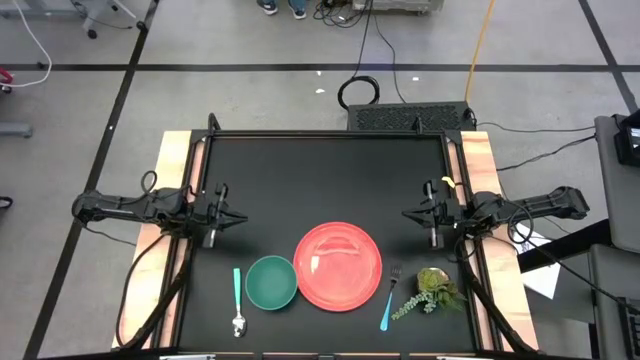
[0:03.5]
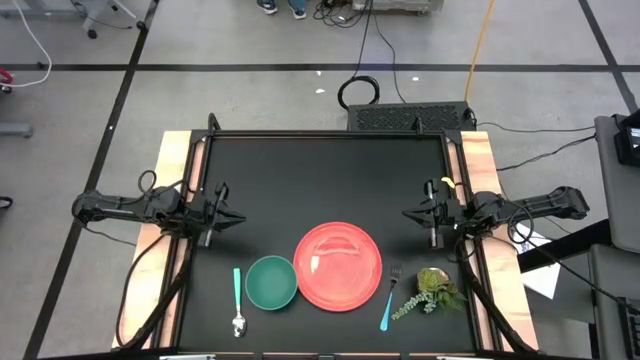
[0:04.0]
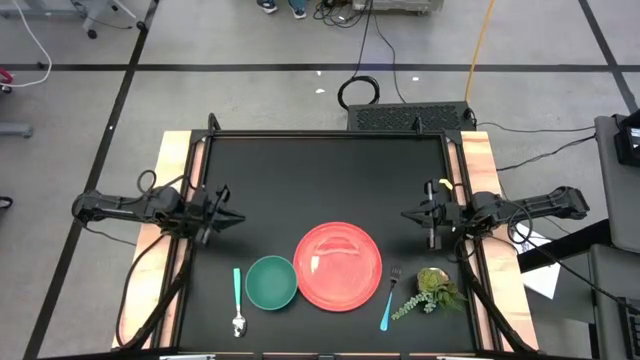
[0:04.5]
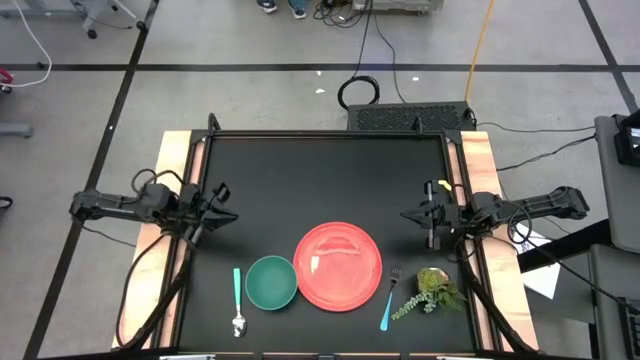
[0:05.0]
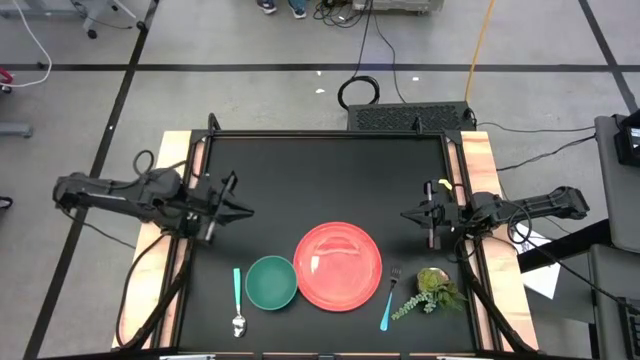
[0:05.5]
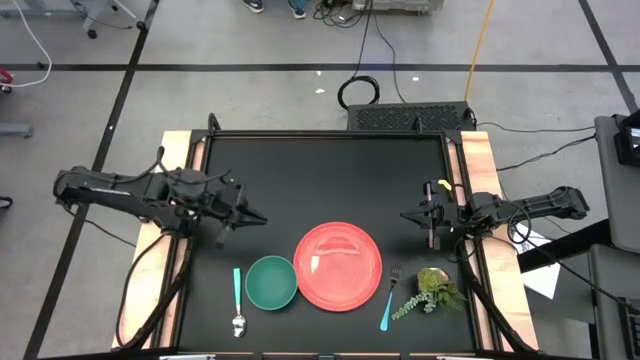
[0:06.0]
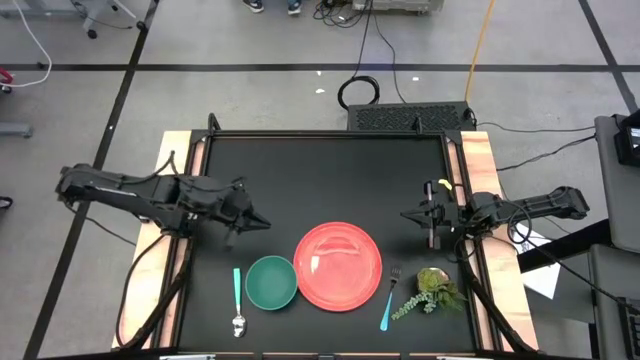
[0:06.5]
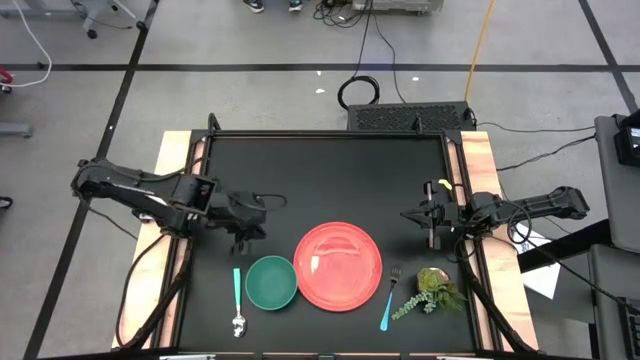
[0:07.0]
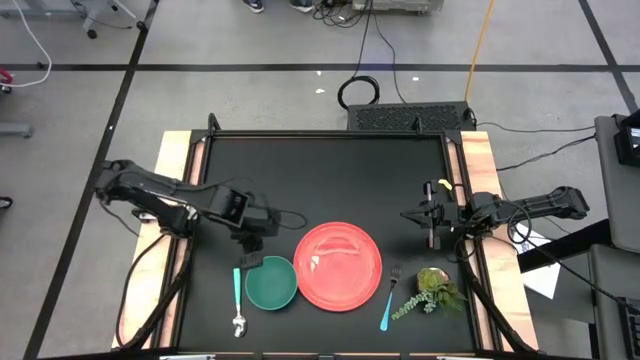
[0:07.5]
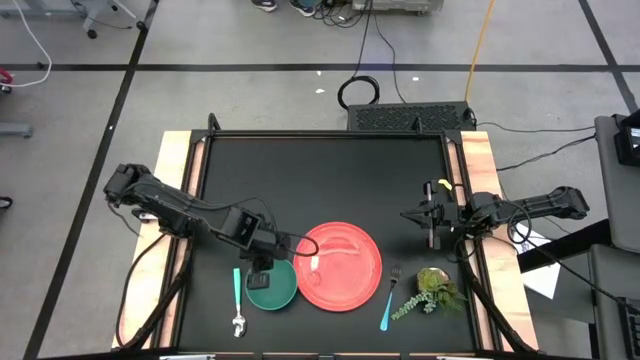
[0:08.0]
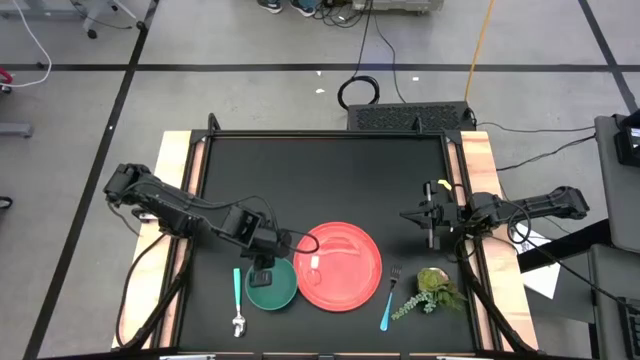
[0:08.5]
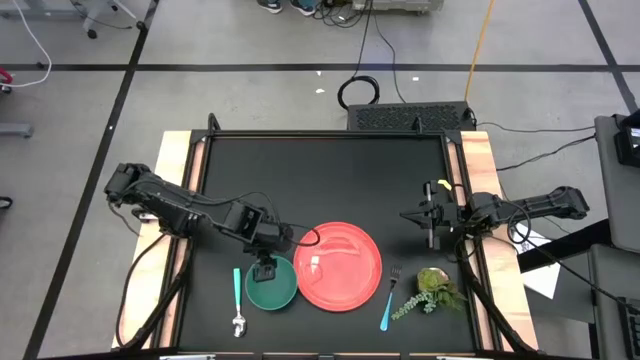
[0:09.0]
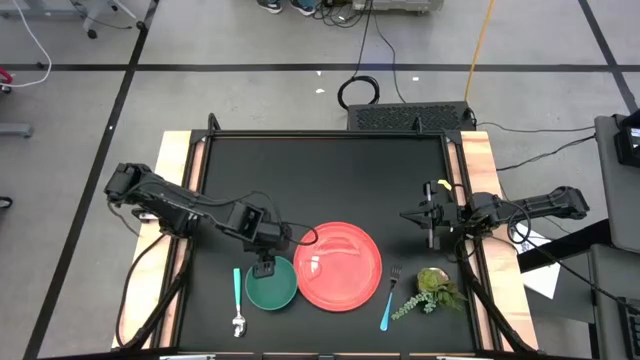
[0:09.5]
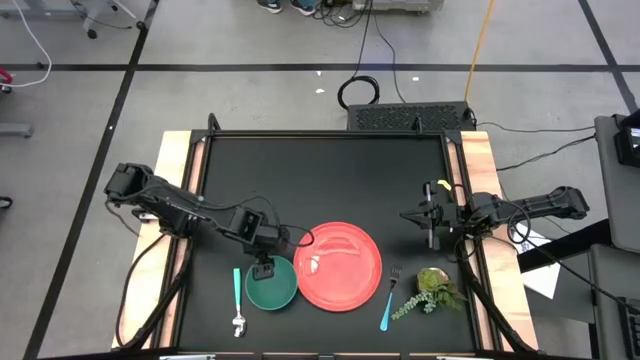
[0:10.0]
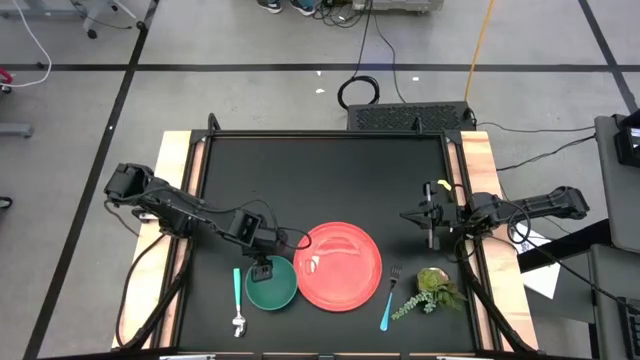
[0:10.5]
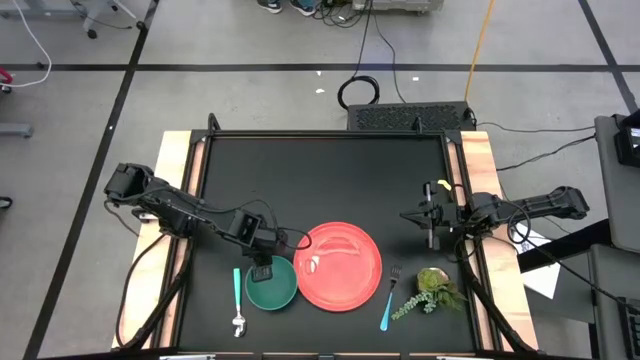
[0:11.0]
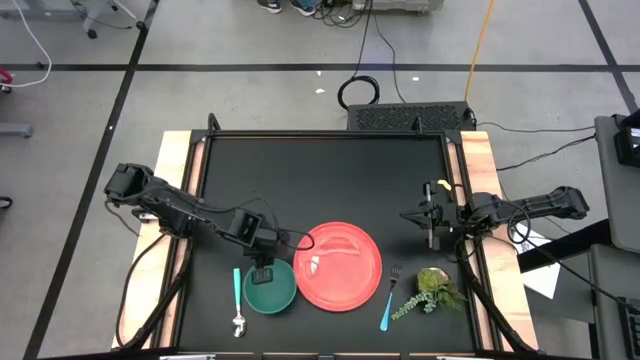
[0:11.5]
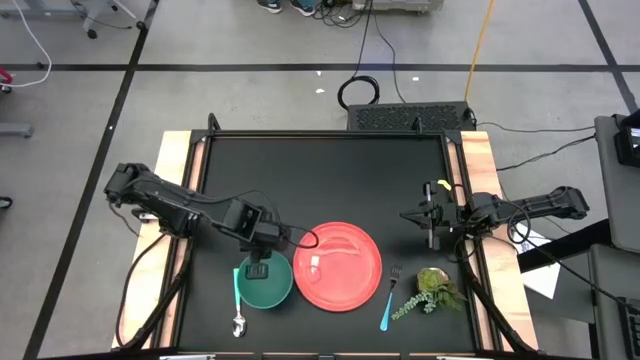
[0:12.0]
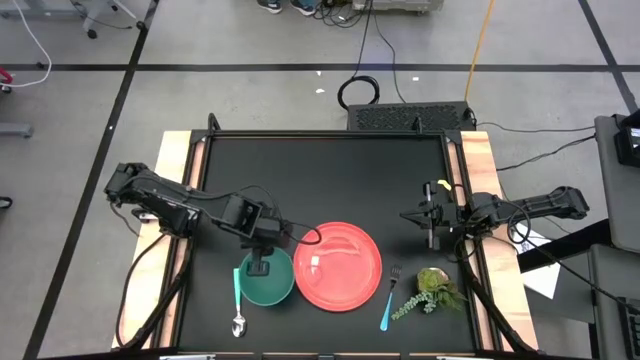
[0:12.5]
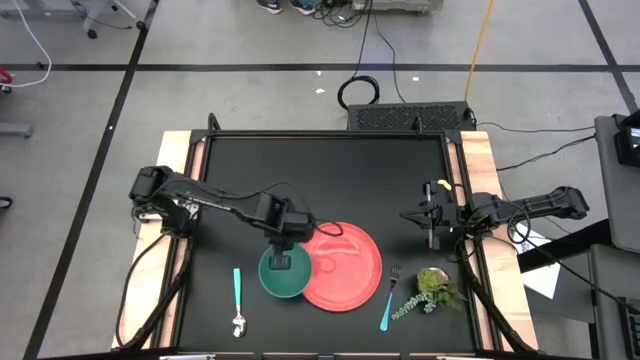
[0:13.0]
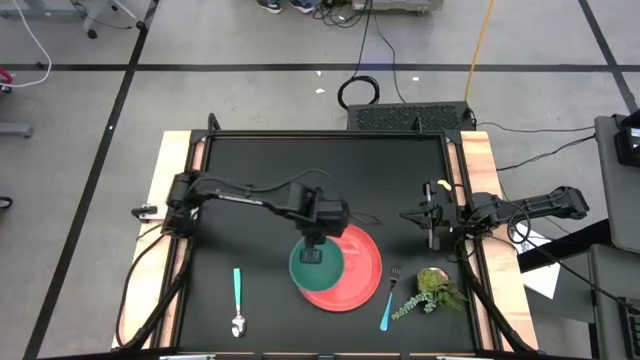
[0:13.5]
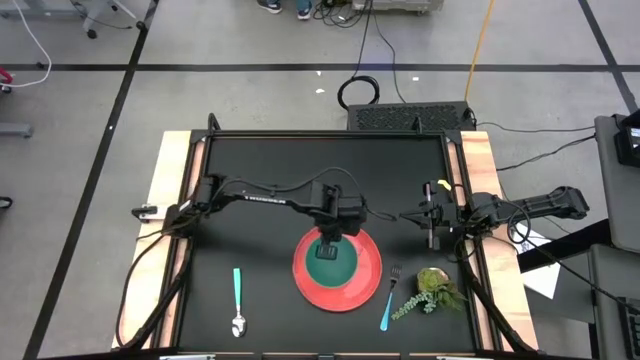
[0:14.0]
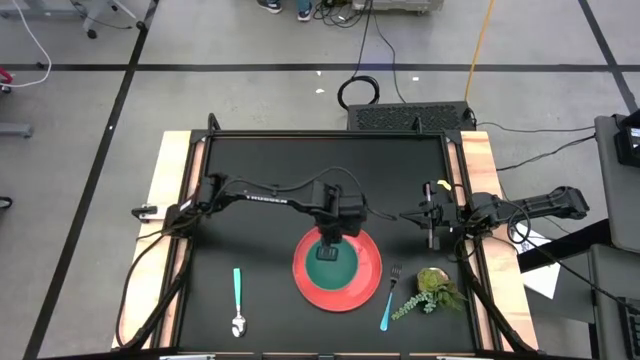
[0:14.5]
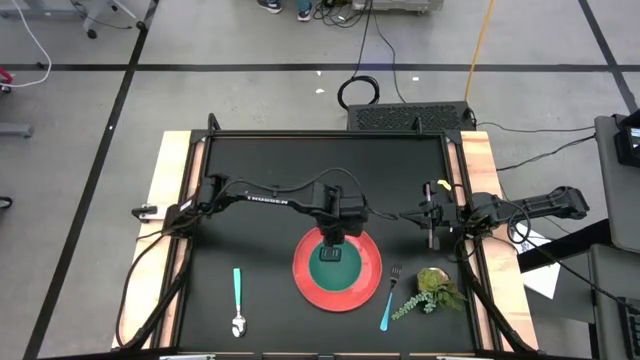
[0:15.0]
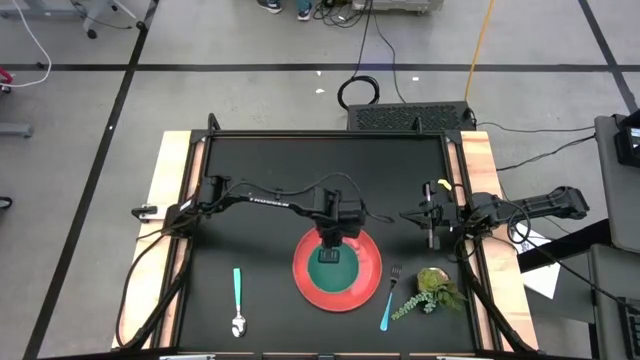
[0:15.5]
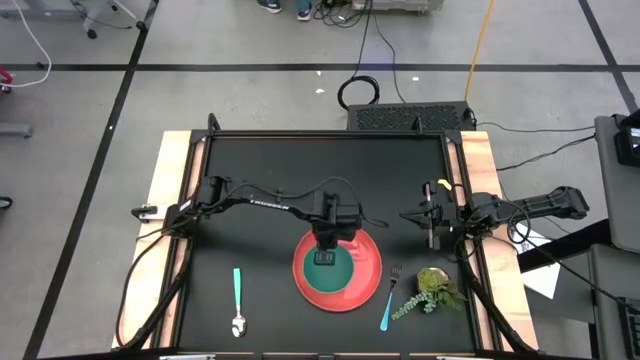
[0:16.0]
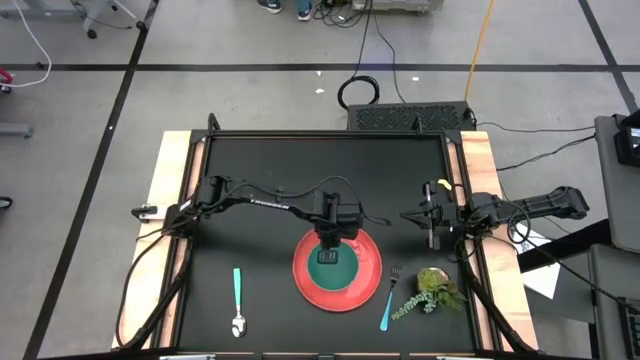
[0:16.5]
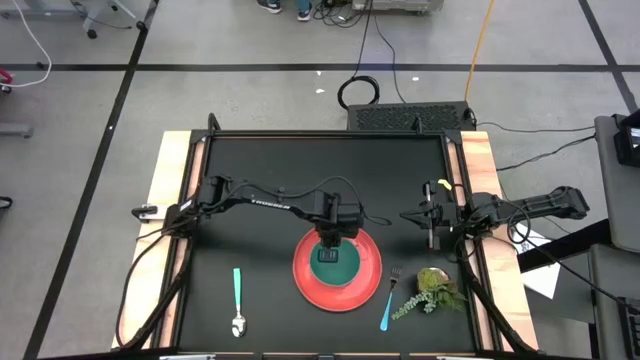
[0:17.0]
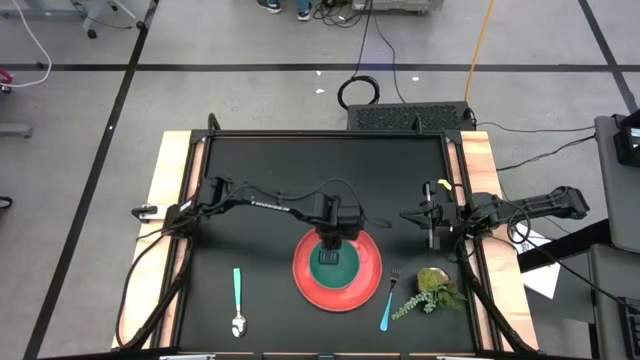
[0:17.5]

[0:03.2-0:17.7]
Task: Set table place
Put the green bowl on the orange plate

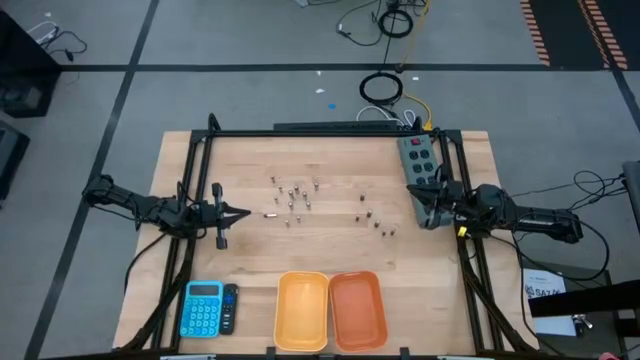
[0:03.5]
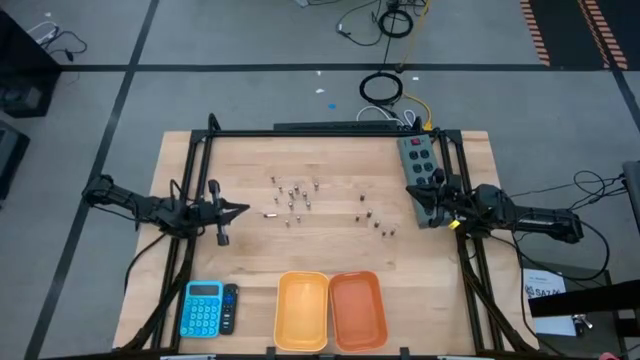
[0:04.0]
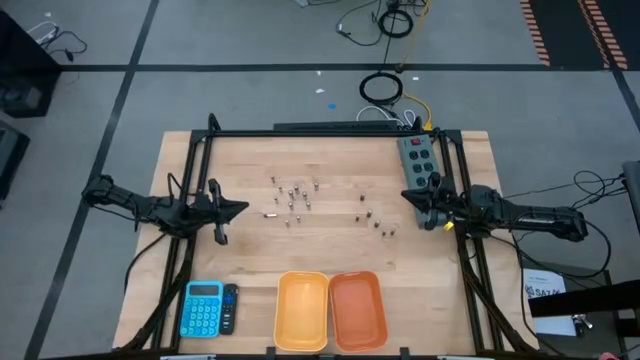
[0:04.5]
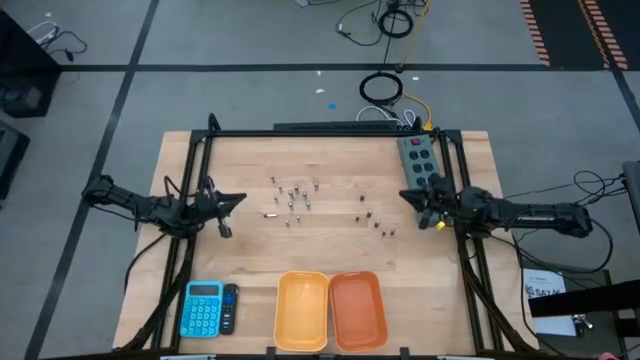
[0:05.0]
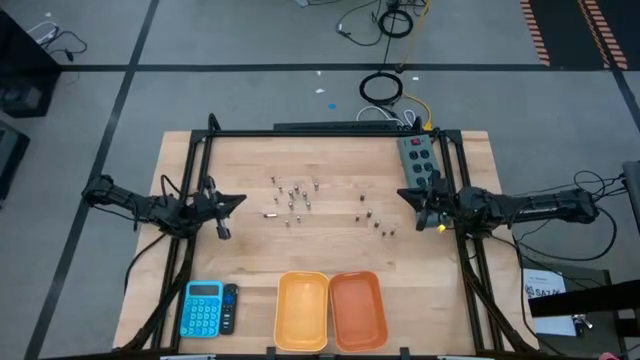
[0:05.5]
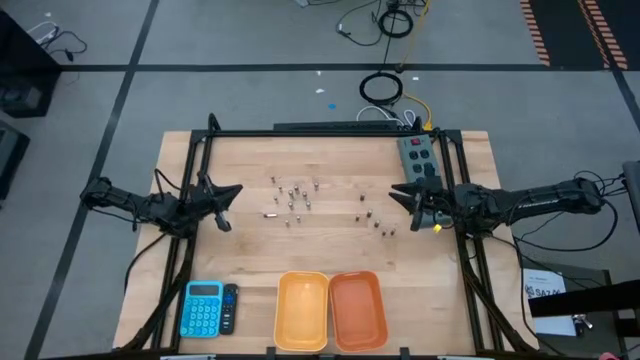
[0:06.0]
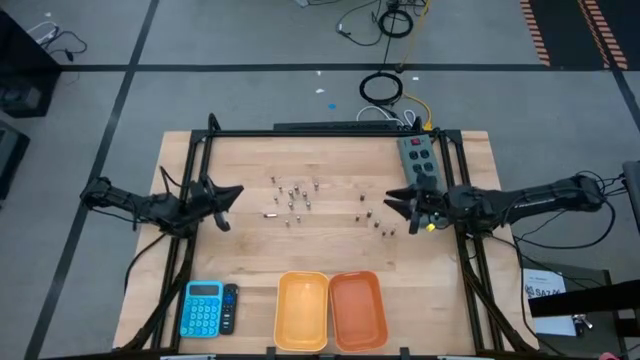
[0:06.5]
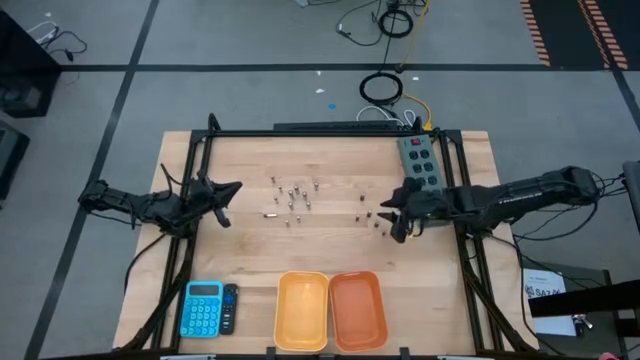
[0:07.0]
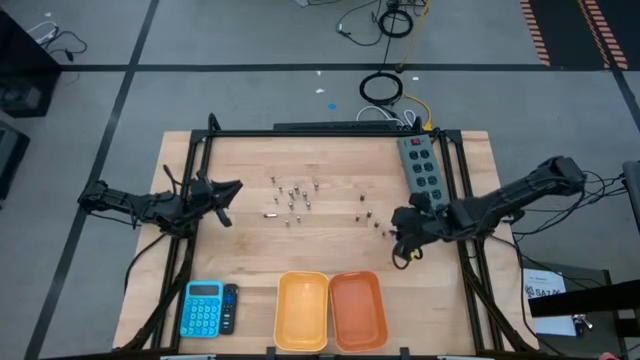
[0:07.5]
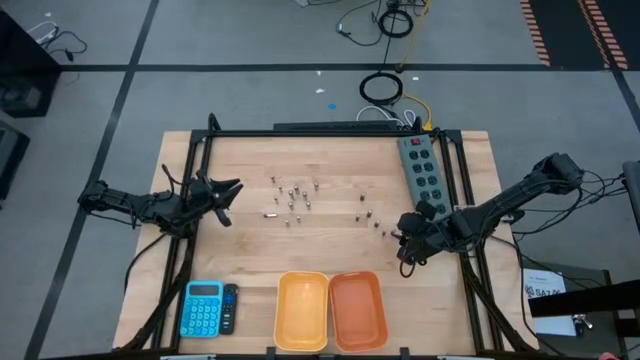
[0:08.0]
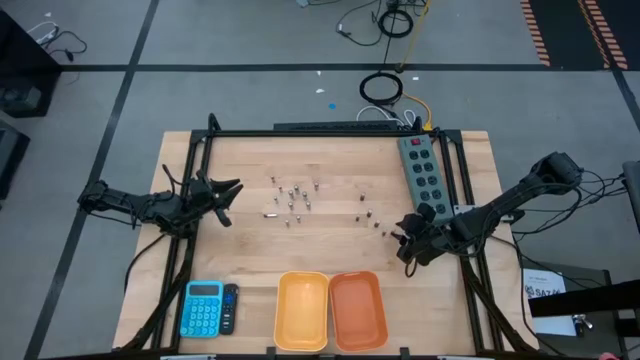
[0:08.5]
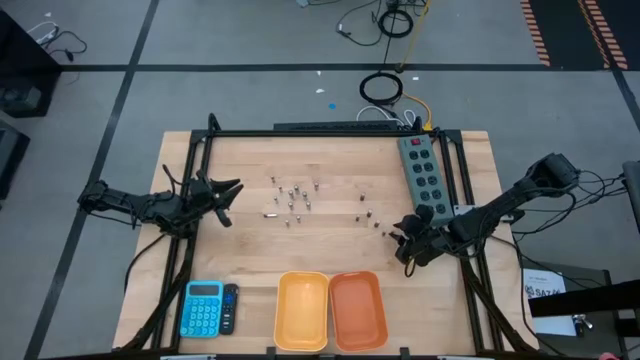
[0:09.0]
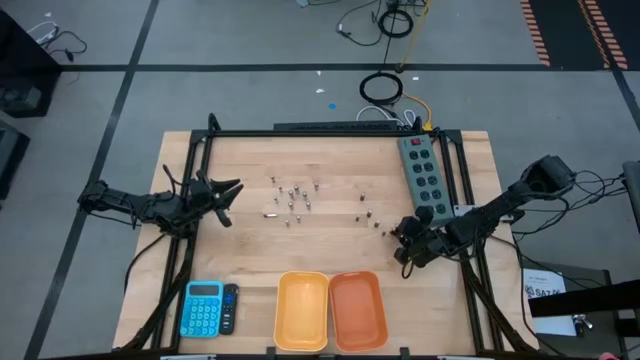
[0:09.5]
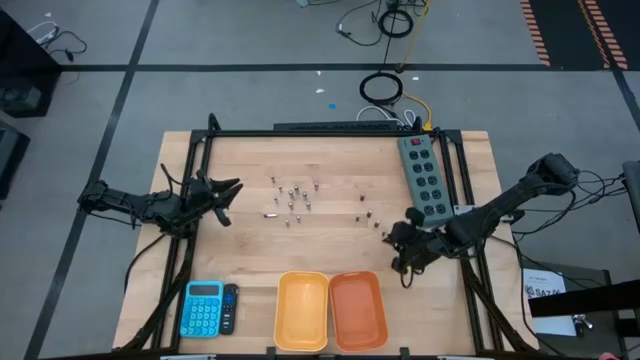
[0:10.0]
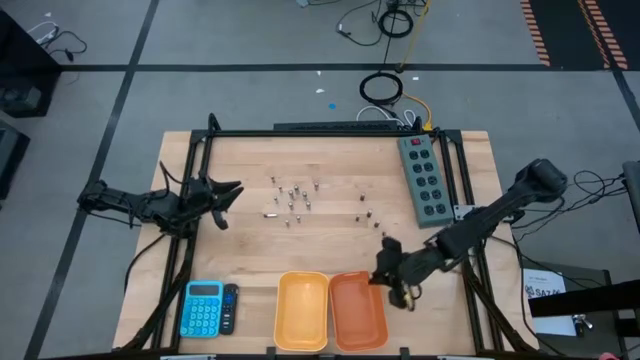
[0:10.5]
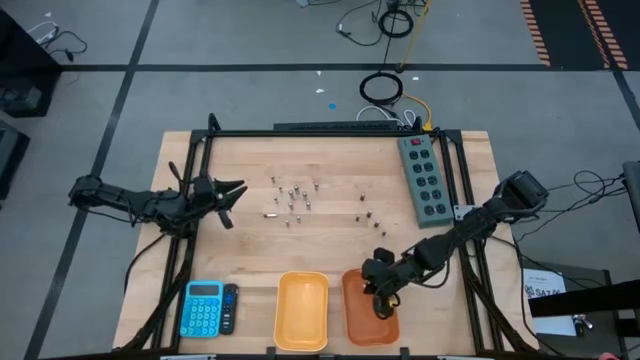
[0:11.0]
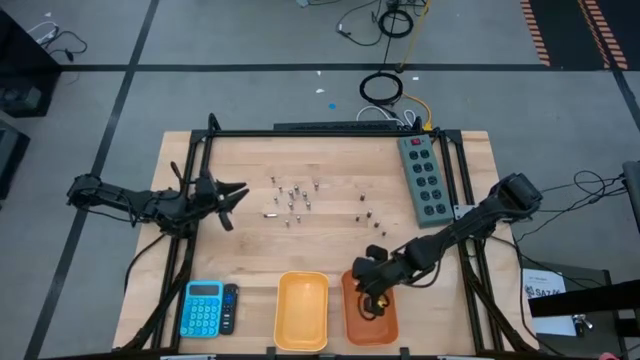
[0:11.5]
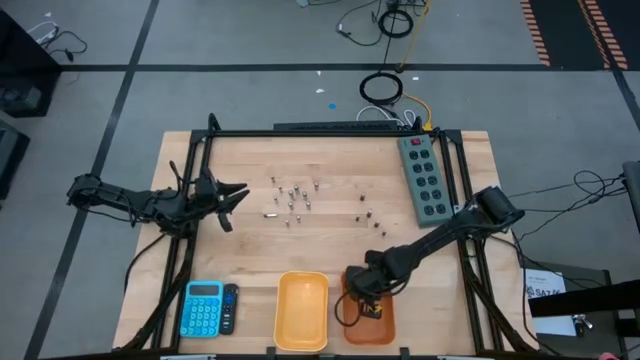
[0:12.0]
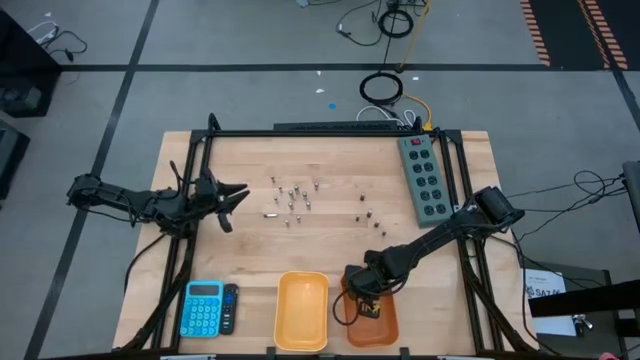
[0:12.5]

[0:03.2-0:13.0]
Task: Sort batteries
Put the black battery into the orange bin
